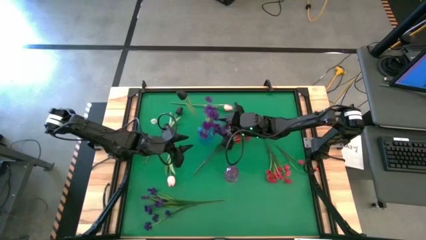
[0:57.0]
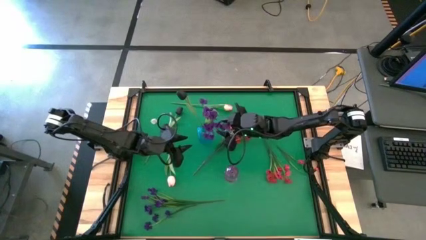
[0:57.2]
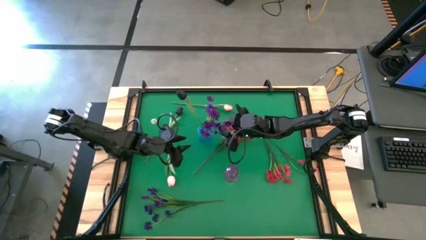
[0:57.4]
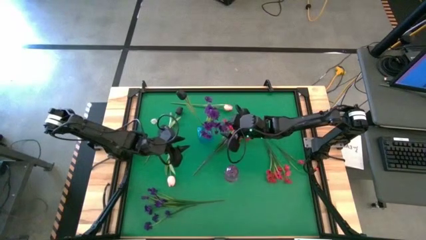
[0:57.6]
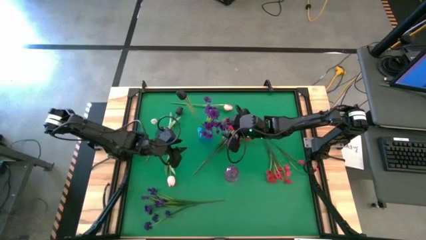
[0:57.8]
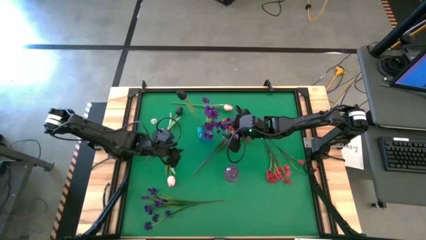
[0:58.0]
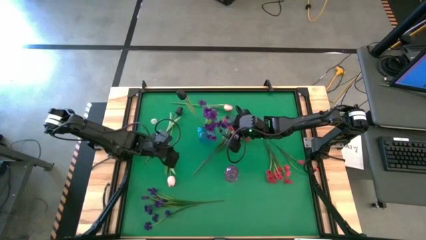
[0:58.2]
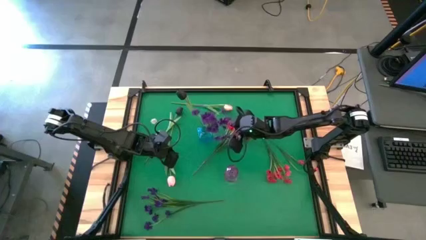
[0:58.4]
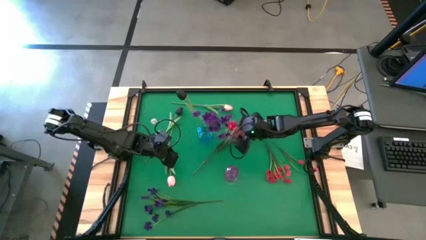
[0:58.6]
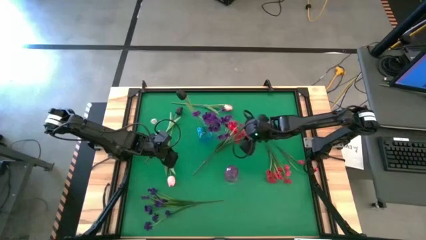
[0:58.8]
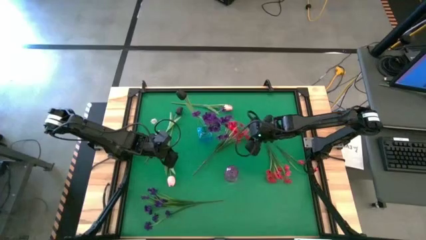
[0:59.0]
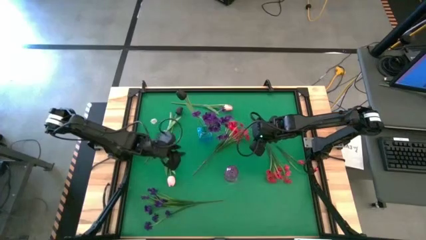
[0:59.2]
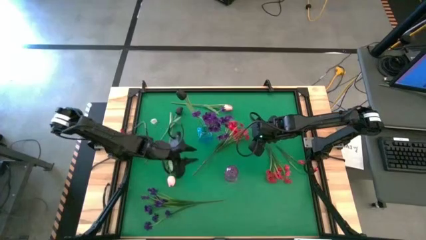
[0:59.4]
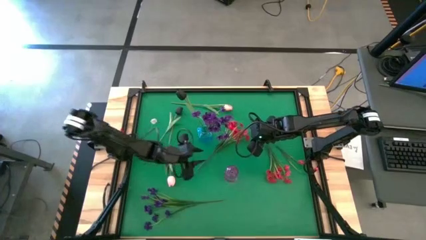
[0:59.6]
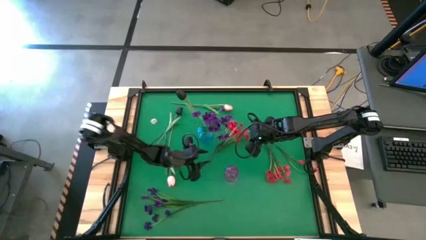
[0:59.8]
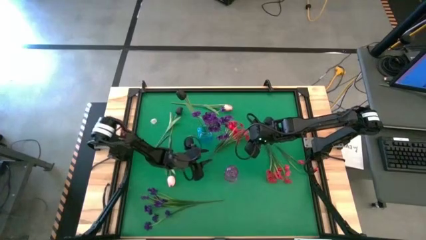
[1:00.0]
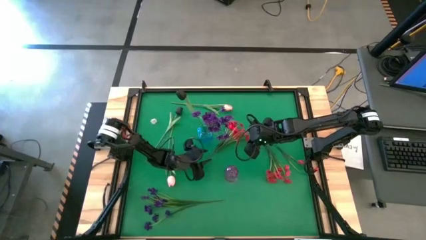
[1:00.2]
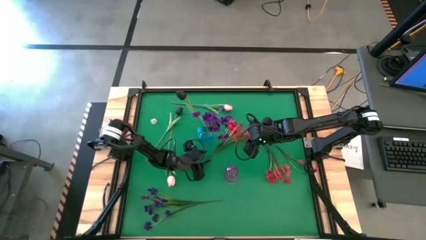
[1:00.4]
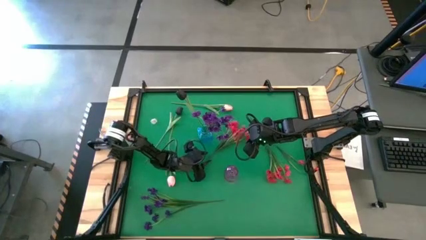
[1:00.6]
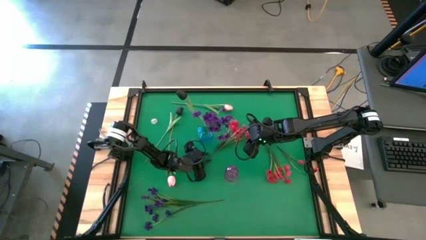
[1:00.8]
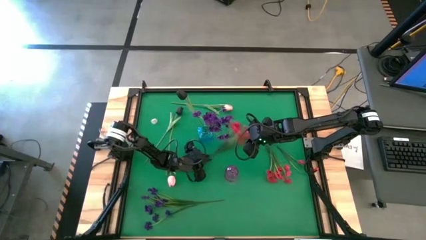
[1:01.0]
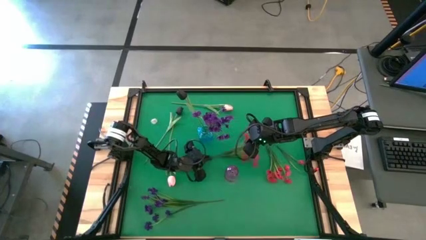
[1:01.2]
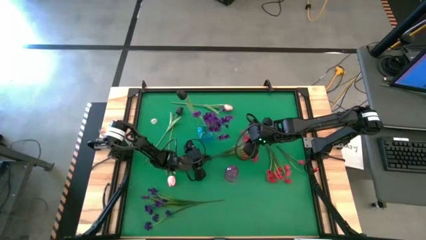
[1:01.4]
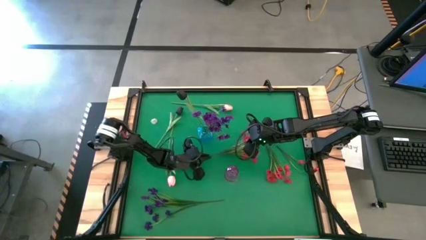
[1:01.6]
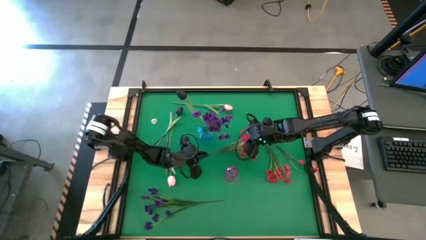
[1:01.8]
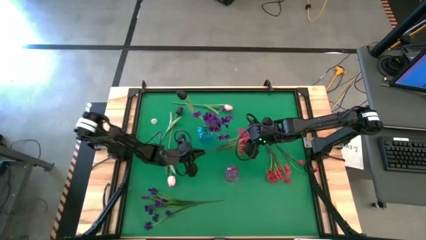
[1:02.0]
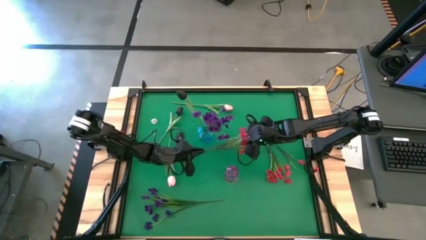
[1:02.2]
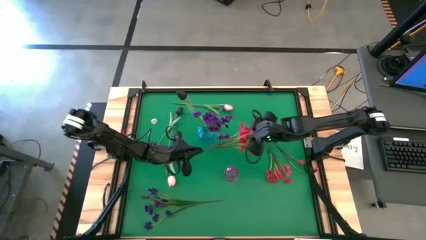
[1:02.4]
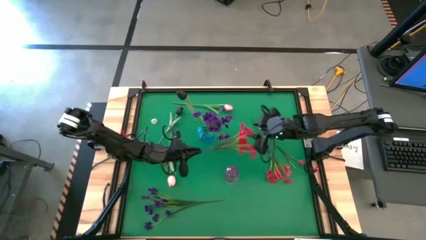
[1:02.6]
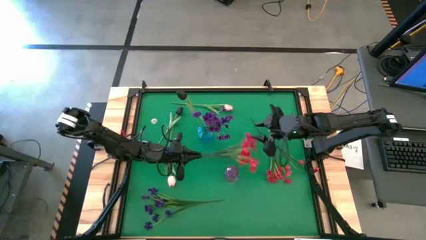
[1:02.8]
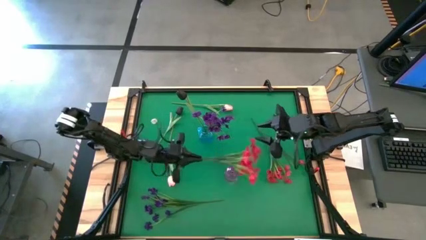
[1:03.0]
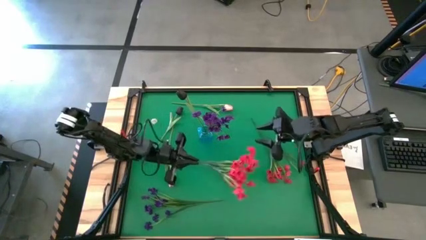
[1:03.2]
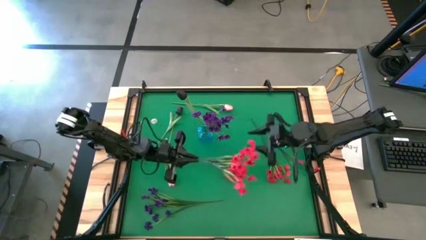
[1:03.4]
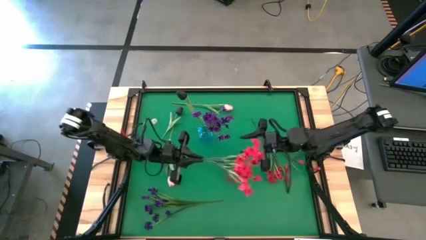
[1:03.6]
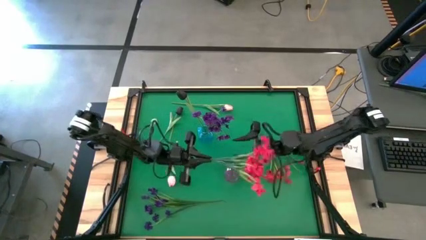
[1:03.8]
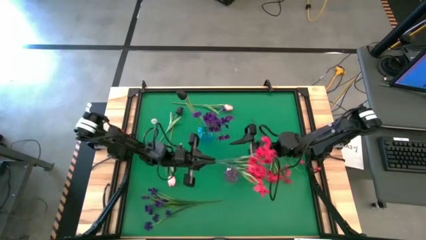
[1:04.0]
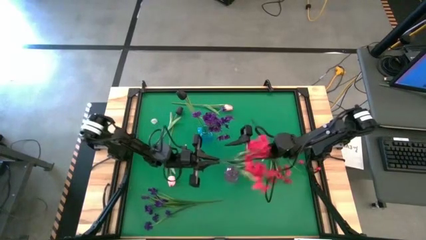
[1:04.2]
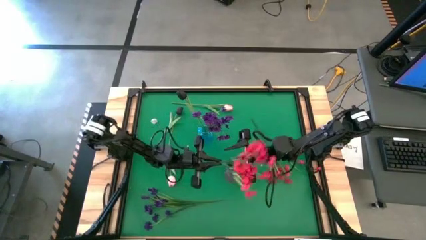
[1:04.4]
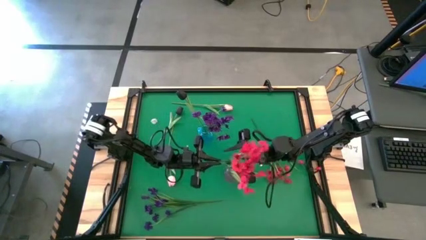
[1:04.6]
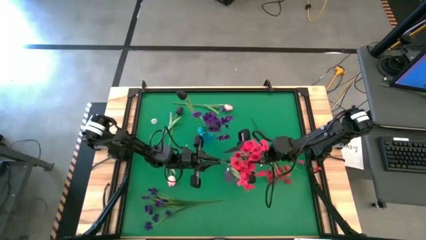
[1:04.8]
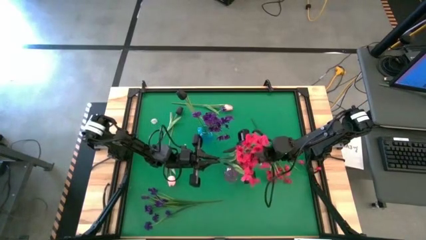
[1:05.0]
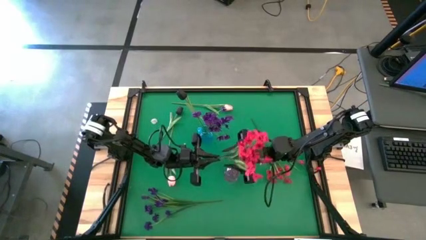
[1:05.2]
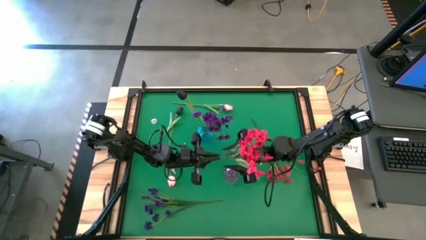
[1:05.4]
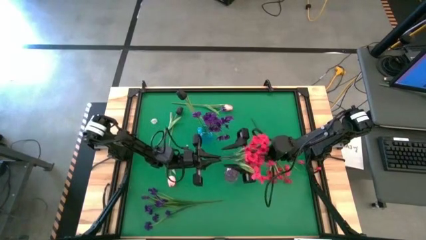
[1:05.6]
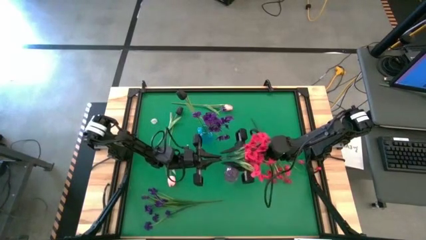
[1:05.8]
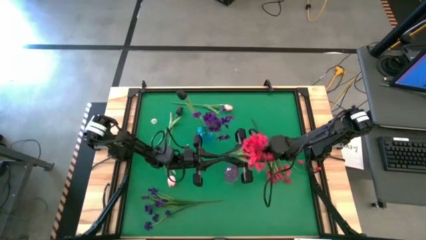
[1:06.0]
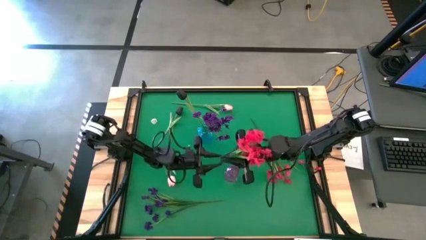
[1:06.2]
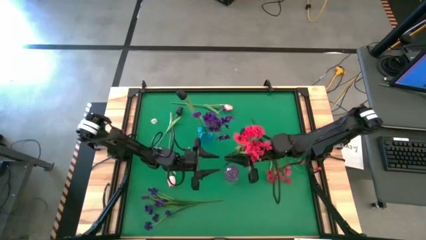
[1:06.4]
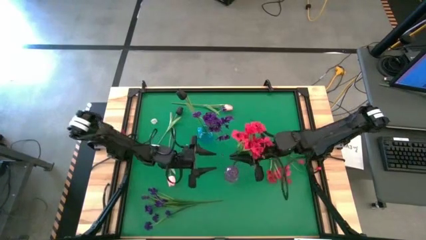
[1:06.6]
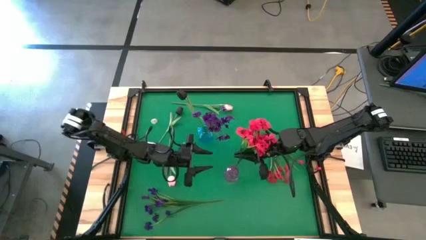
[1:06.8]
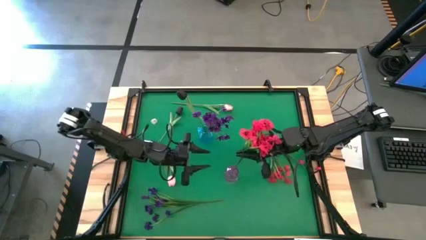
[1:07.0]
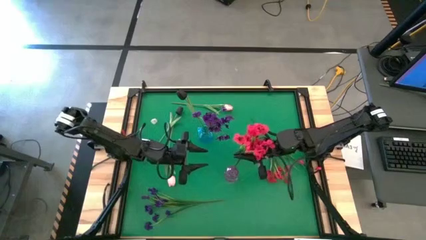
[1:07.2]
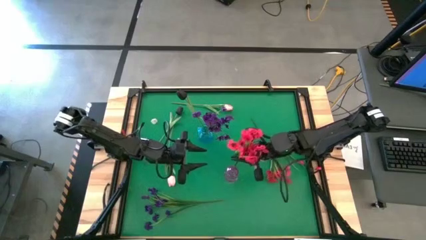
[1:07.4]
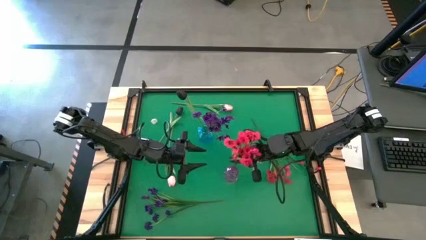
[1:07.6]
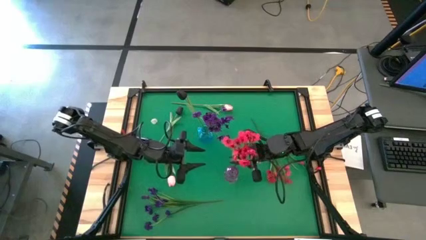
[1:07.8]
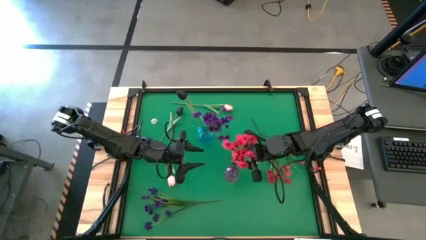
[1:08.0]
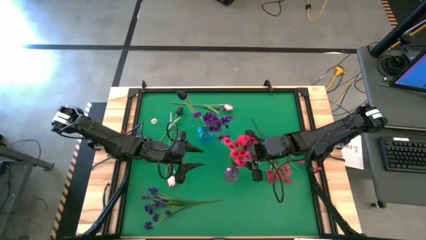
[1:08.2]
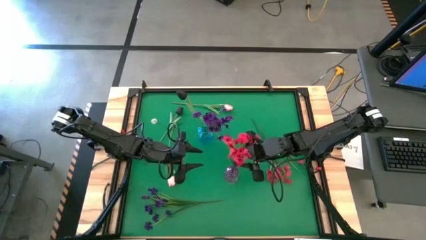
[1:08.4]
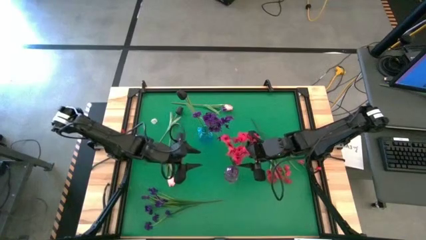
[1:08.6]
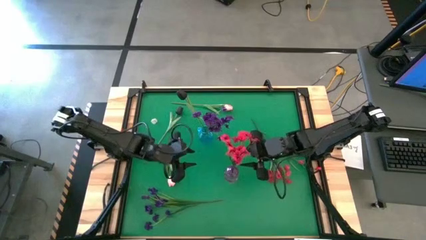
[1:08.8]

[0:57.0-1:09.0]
Task: Sort flowers into vase by color
Put the left pink flowers into the purple vase
